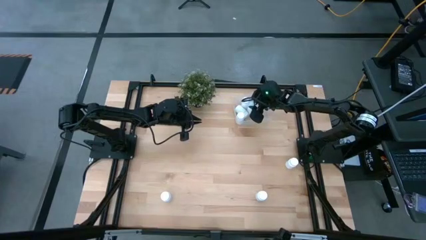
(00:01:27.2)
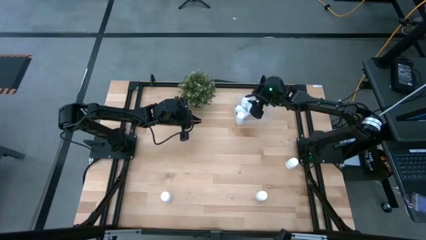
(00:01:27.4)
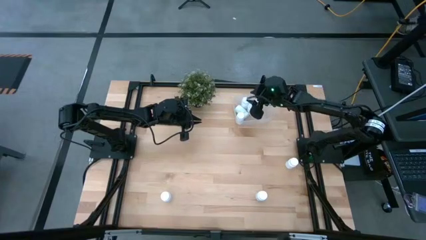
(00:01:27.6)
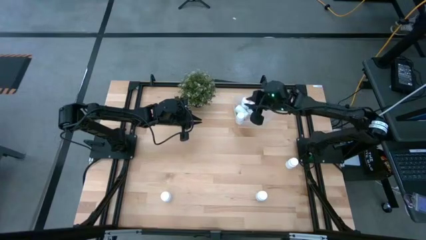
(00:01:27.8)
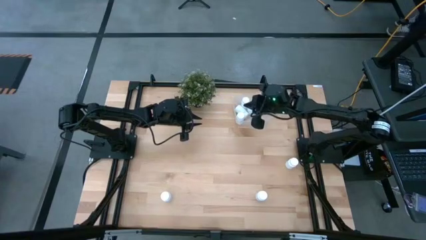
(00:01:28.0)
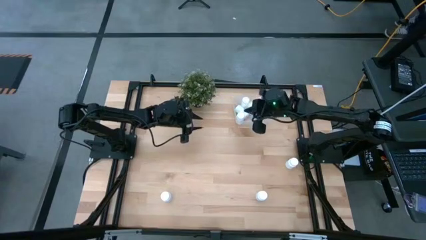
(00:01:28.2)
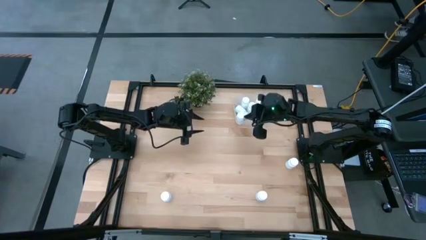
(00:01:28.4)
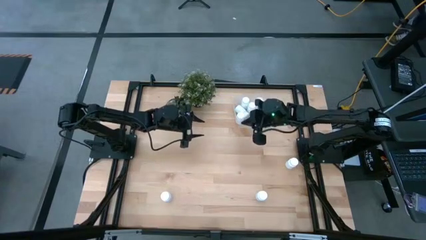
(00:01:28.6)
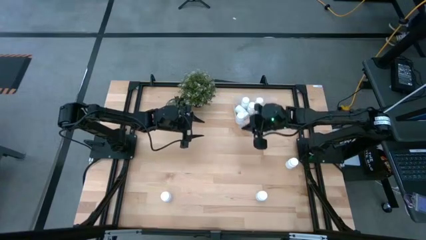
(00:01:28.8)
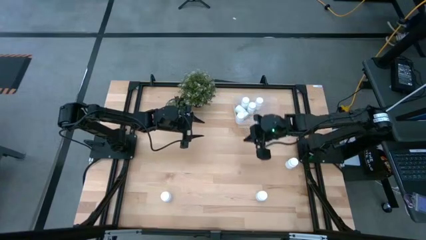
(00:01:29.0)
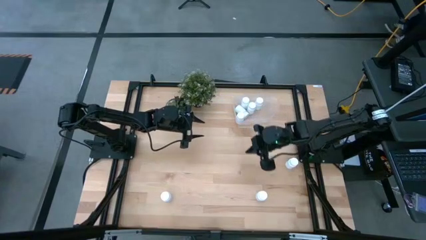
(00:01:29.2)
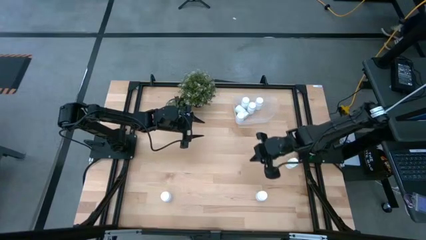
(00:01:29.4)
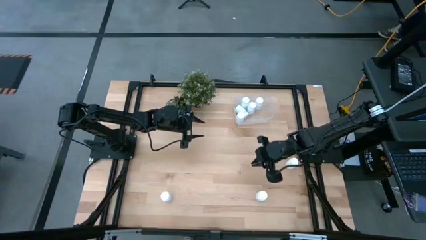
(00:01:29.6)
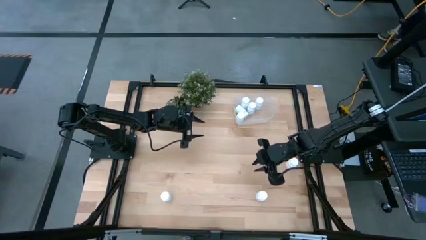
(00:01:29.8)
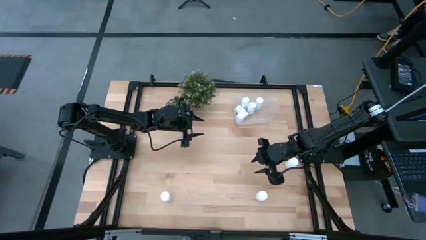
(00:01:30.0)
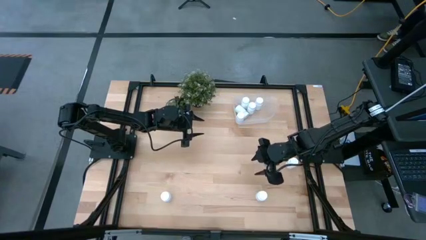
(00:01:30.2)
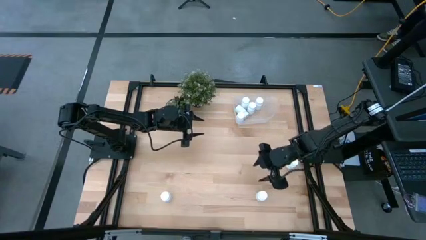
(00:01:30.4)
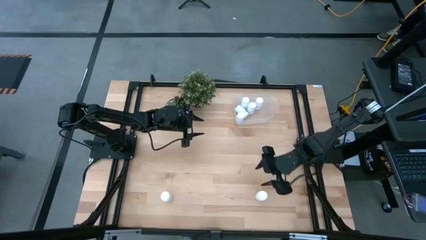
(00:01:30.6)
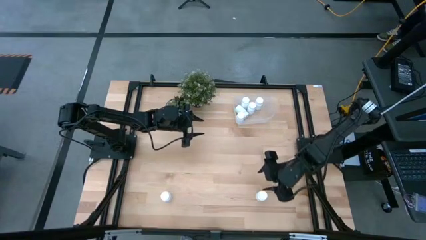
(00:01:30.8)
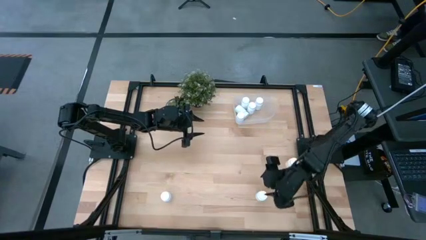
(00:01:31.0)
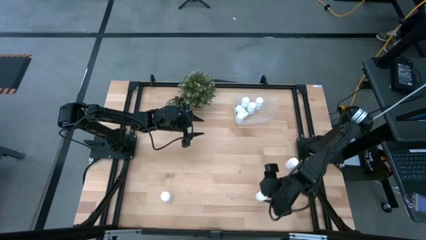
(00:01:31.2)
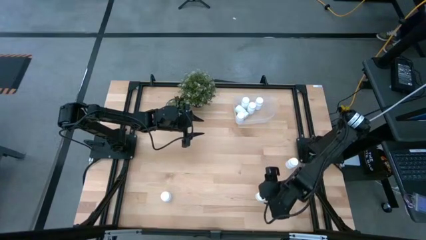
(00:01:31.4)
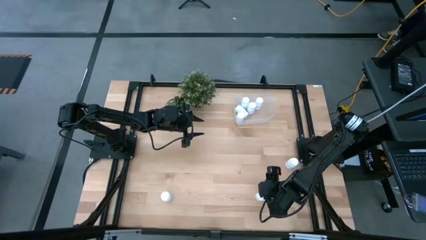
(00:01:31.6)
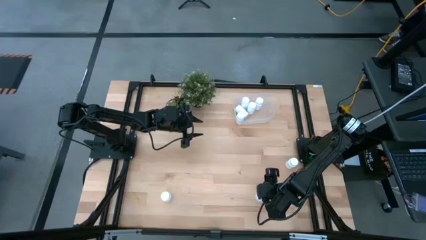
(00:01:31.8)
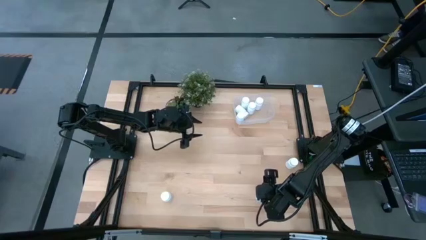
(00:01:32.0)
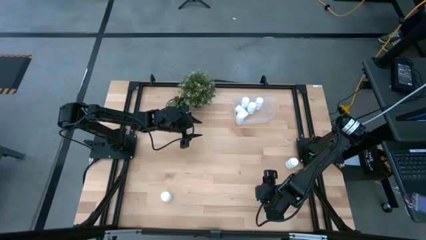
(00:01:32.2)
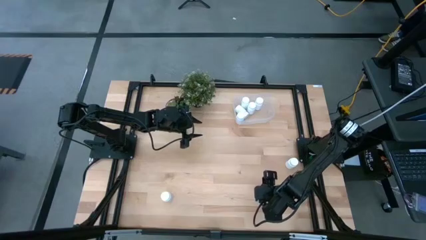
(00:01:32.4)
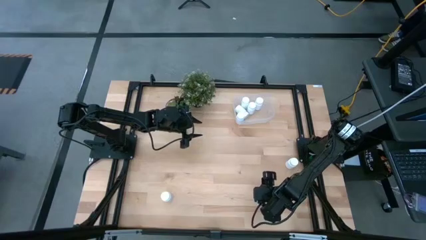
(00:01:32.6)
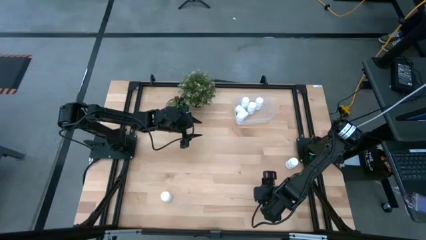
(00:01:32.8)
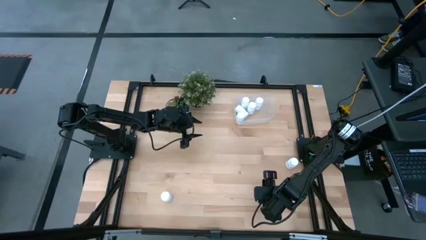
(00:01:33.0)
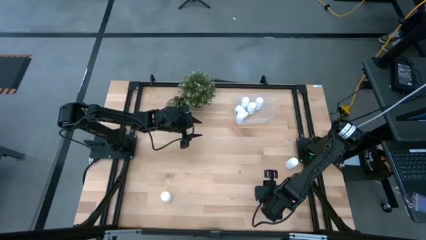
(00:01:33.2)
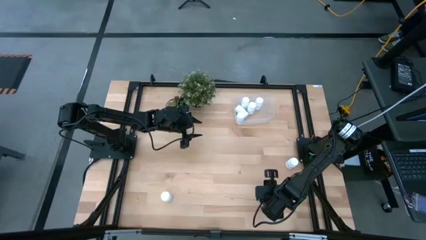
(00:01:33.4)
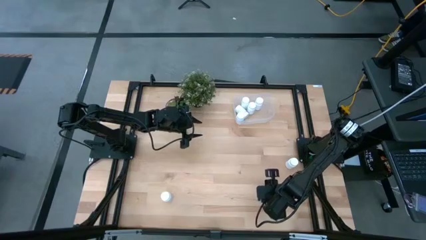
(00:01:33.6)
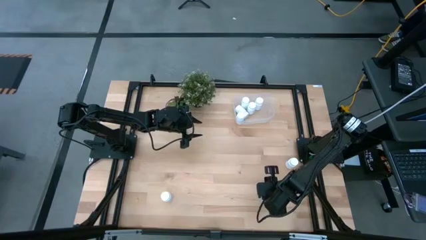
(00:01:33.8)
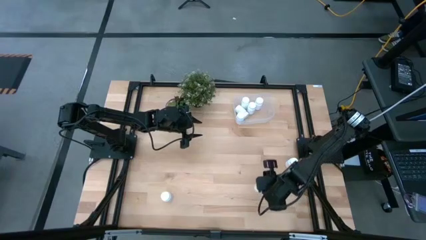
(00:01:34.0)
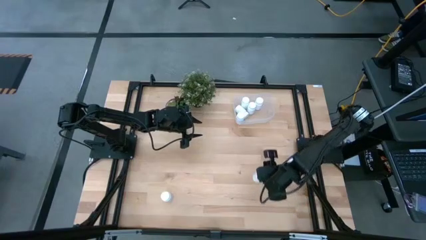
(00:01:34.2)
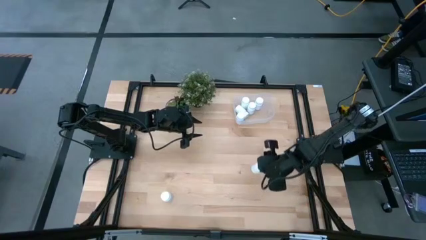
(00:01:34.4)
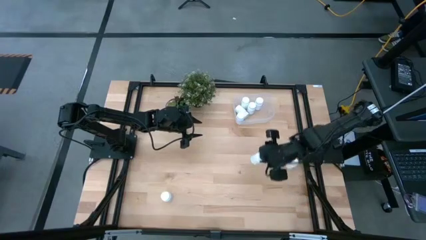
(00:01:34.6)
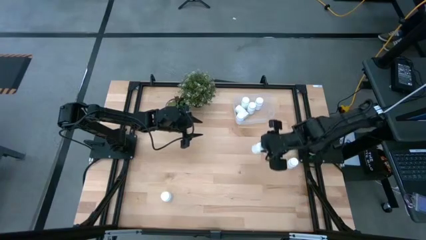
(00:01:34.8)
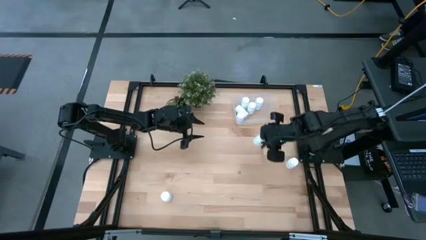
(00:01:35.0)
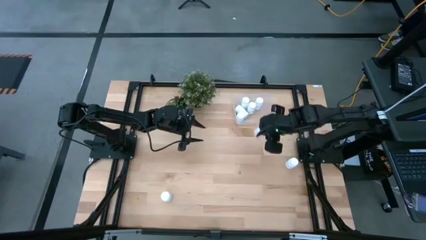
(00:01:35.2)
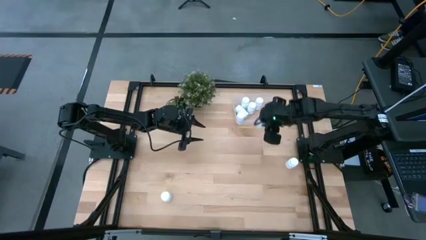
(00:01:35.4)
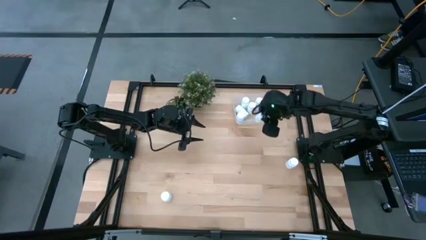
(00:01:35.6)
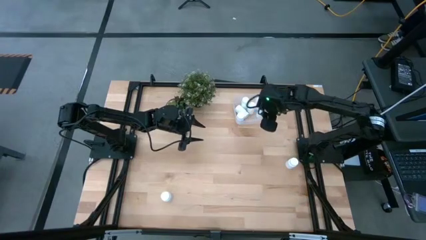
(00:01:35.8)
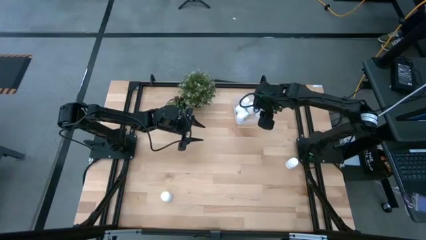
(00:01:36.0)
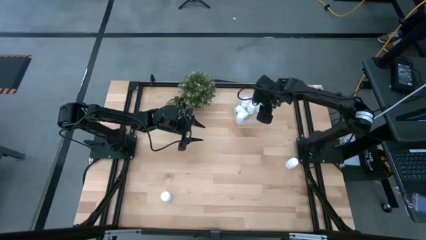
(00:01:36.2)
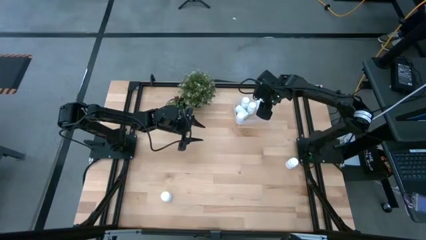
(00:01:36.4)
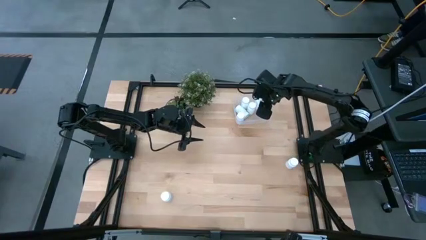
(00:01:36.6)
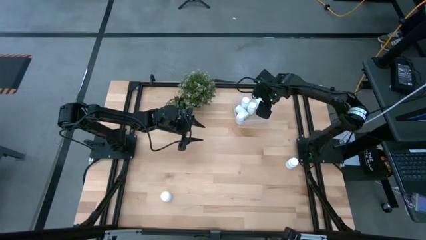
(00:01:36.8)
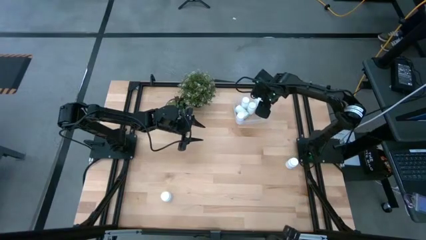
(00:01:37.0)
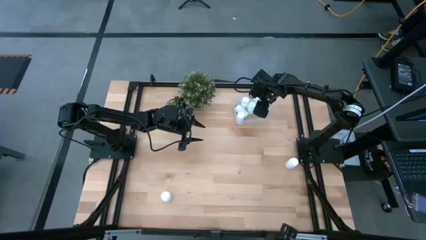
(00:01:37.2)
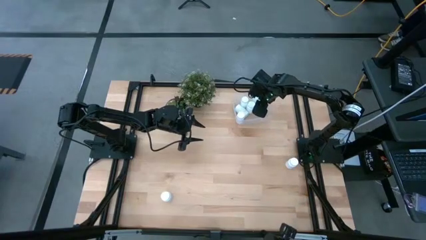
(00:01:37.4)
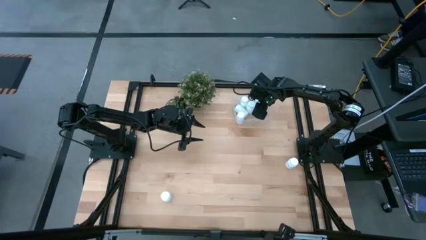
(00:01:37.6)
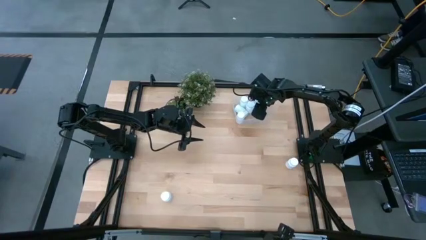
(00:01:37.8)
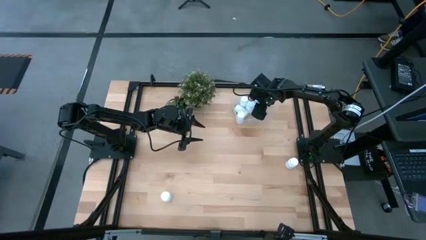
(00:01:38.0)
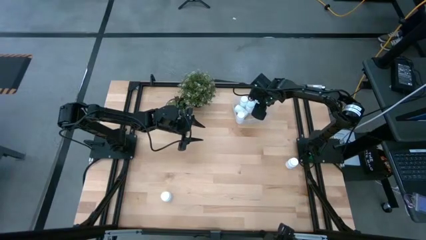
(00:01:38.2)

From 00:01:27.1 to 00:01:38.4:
Task: Pick and place pill bottles into a basket
Put the white pill bottle into the transparent bin

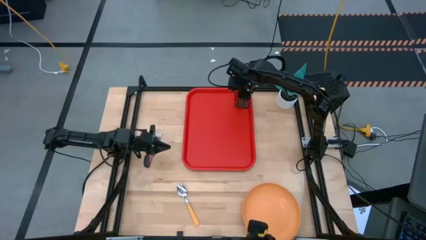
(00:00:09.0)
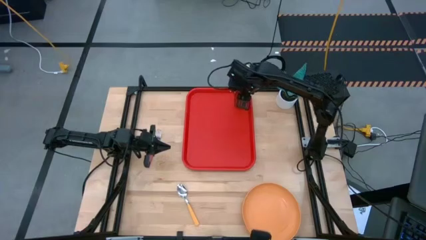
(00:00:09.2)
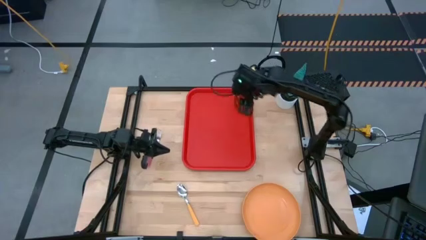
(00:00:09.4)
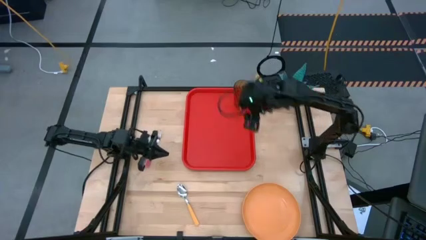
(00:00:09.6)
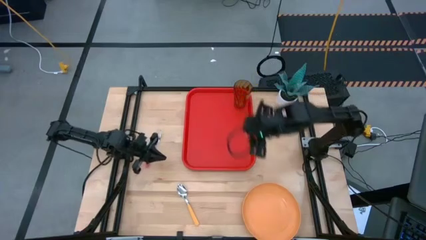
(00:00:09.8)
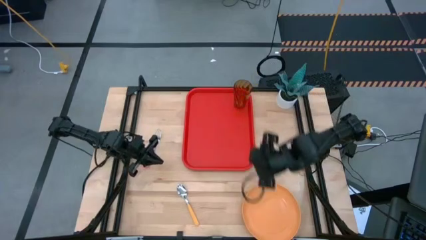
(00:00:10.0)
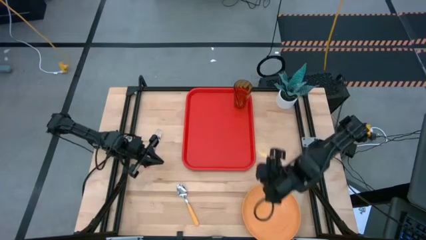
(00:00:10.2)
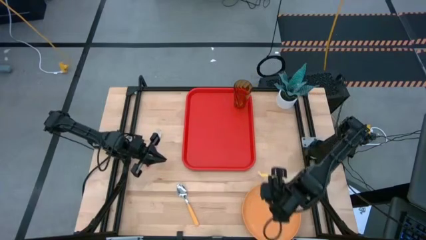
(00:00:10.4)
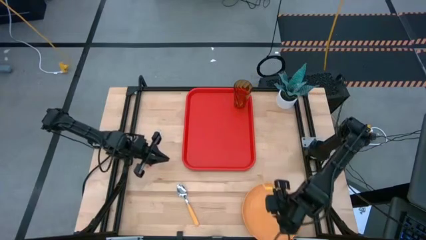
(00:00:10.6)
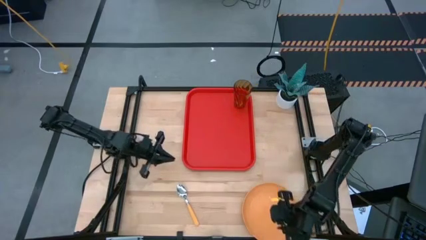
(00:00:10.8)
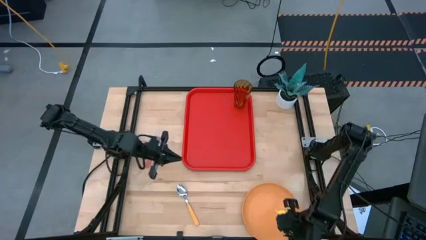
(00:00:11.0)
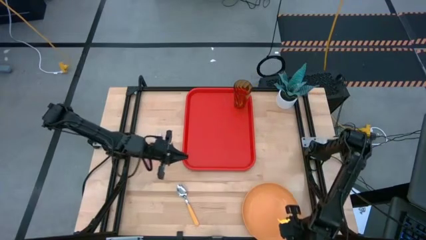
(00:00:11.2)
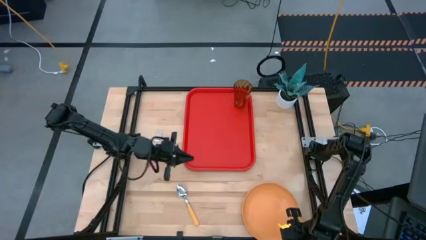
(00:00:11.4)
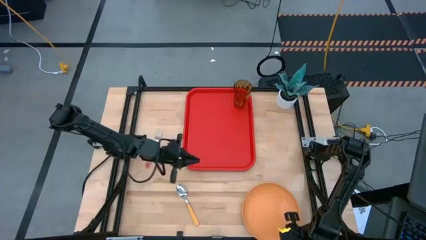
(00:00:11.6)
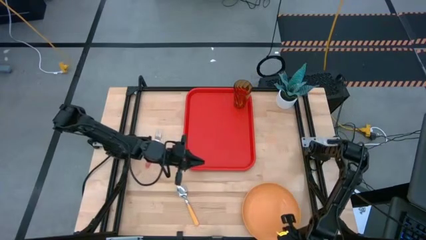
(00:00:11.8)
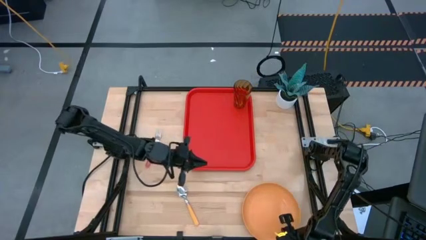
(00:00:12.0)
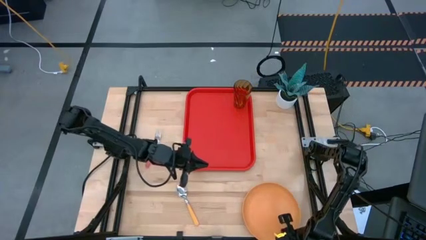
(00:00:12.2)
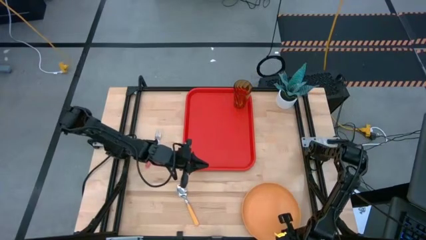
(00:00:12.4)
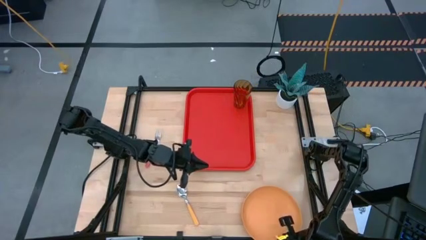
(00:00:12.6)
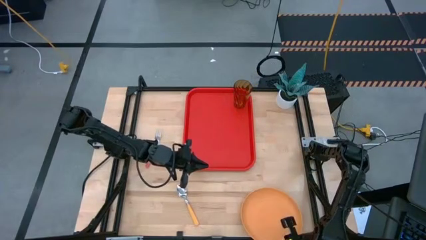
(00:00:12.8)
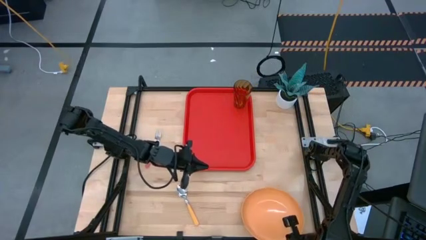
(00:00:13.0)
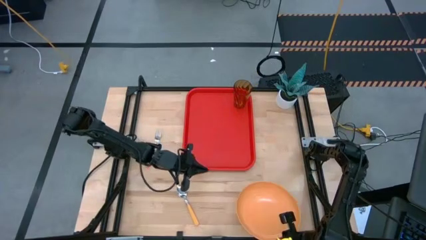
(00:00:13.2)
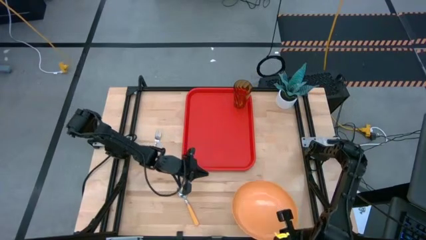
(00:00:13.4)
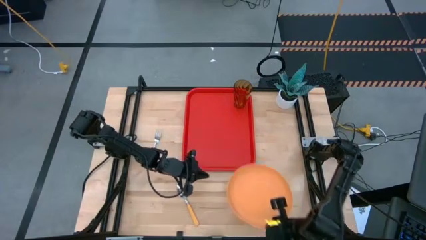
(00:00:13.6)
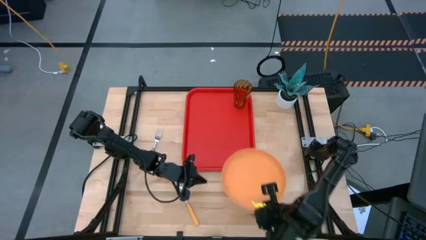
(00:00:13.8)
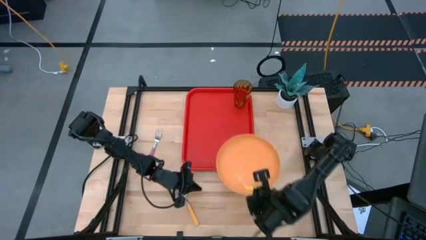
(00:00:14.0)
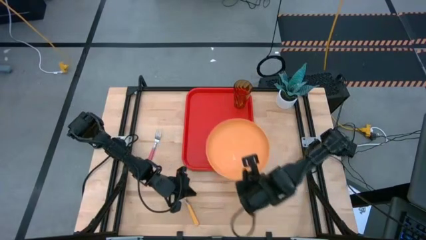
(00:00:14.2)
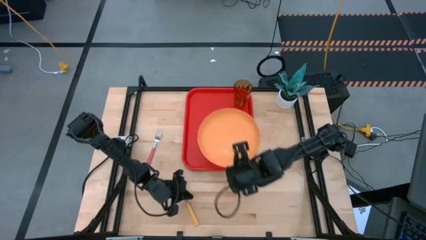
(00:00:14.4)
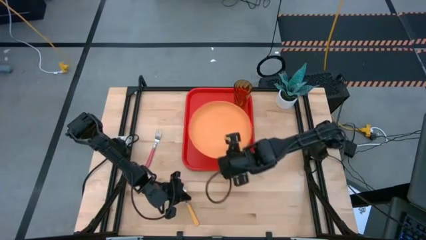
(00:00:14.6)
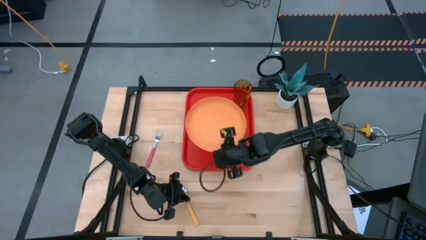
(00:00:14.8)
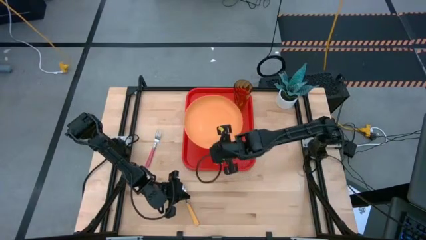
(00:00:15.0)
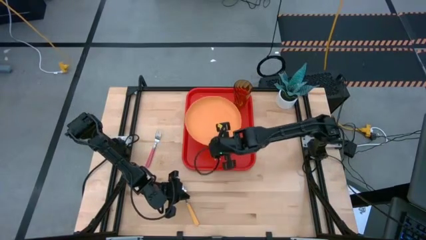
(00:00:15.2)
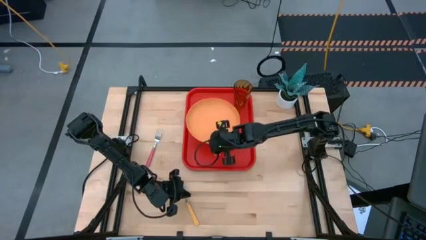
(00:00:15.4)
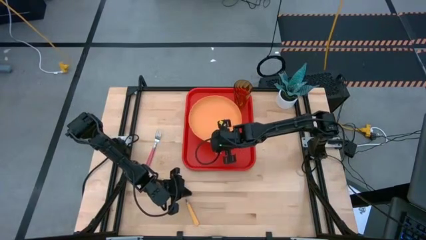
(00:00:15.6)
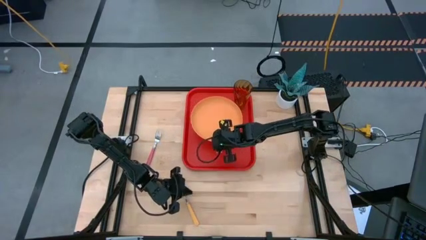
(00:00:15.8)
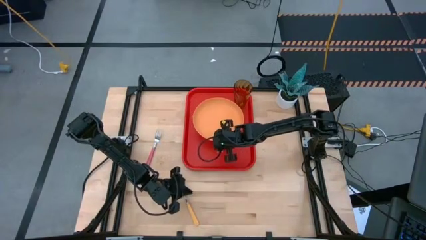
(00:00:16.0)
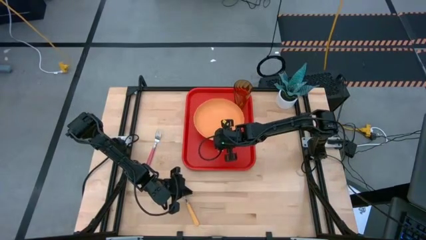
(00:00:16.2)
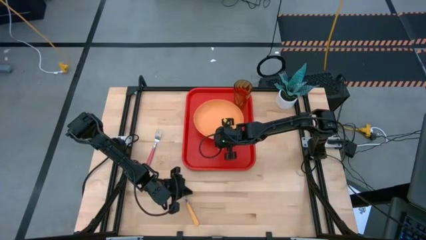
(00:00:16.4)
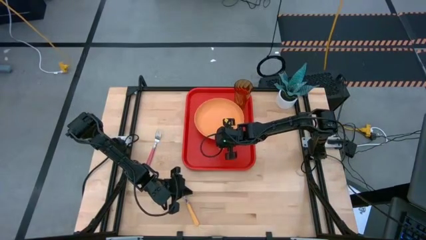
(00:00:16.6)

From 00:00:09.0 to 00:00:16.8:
Task: Pick and place plate/cup/fork/spoon on tray
Put the yellow plate on the red serving tray to the bottom left of the yellow cup
